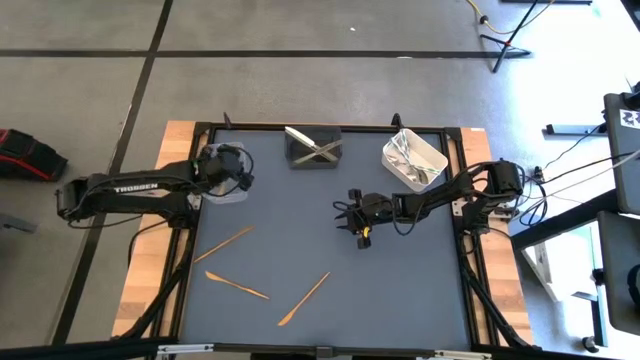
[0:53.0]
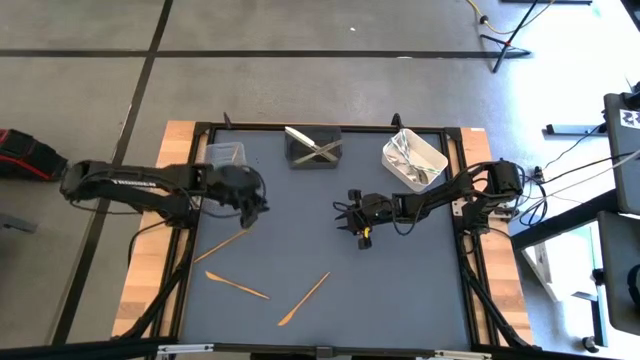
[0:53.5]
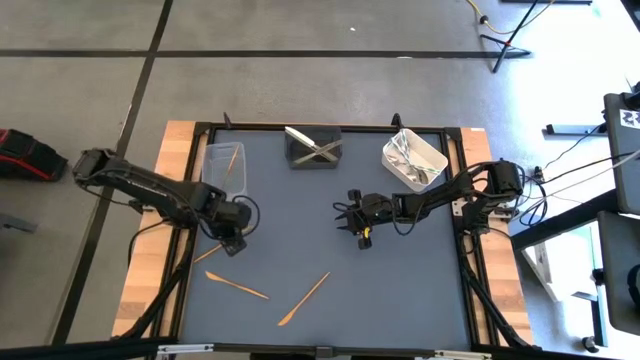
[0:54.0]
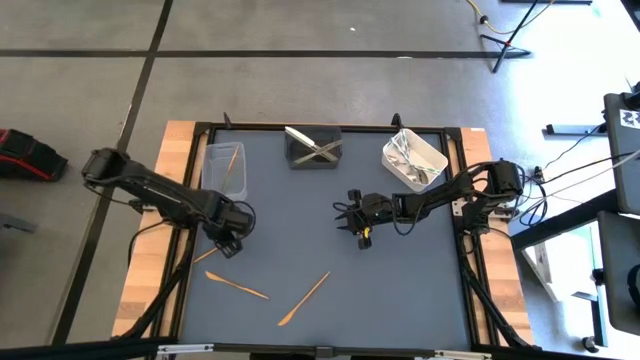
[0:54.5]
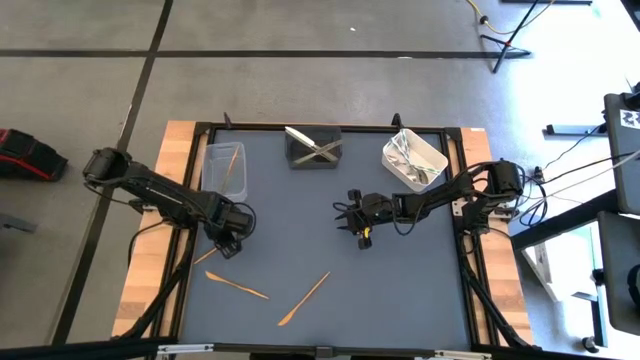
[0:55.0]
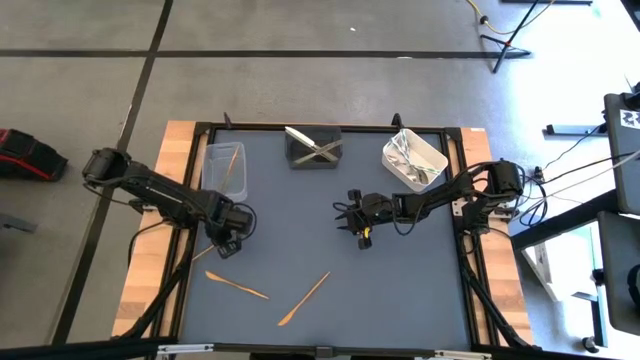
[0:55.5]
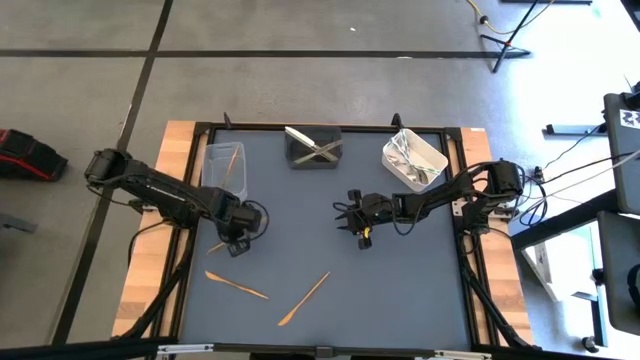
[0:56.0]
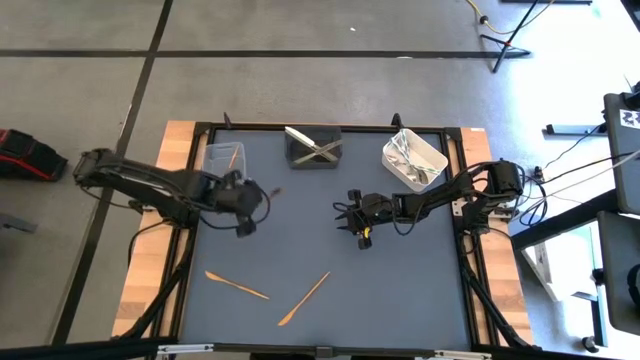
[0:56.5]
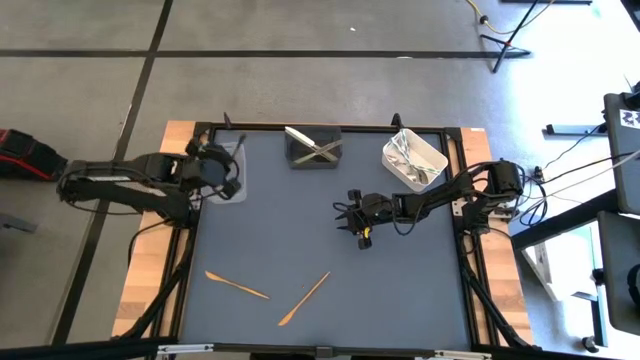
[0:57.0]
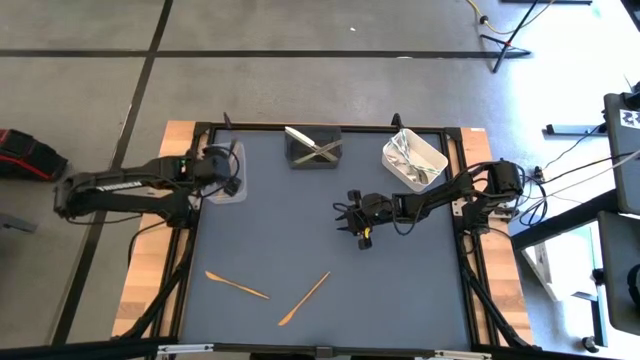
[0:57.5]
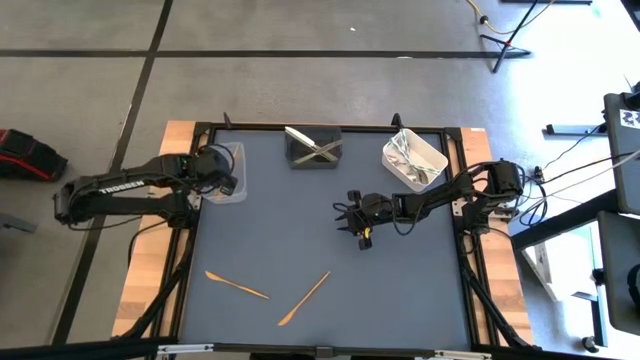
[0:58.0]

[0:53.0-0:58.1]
Task: Sort silverware by color (type)
Put the top left gold knife into the transparent bin

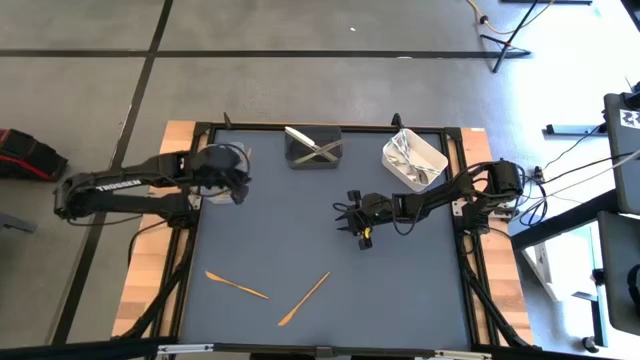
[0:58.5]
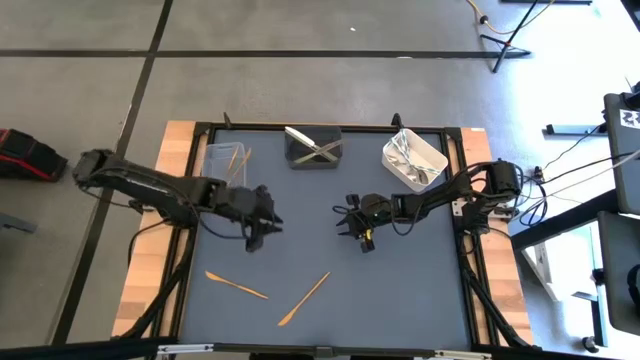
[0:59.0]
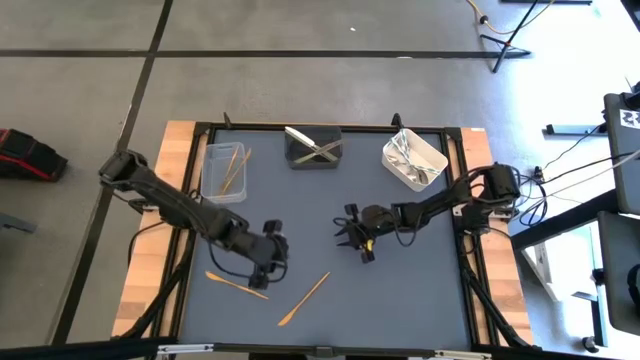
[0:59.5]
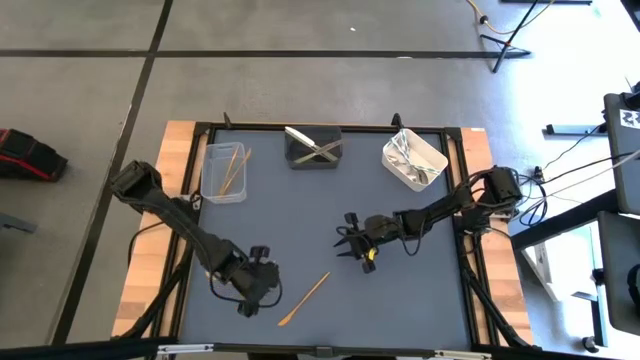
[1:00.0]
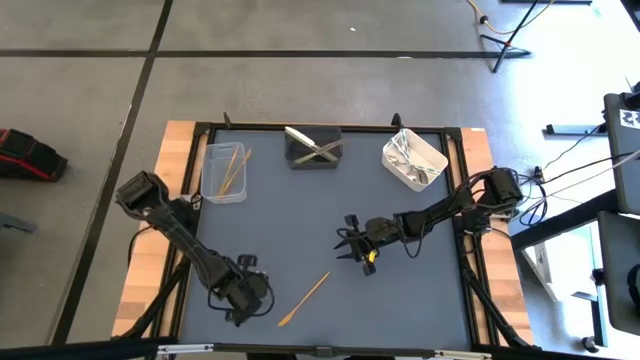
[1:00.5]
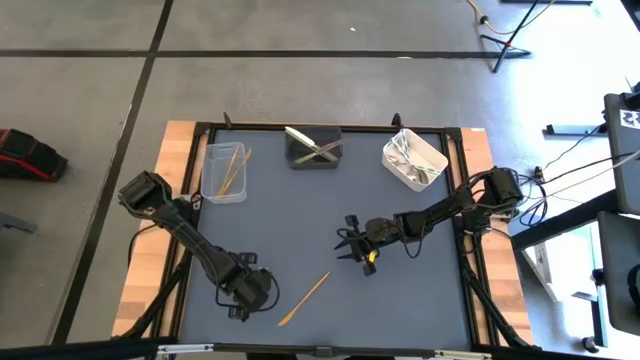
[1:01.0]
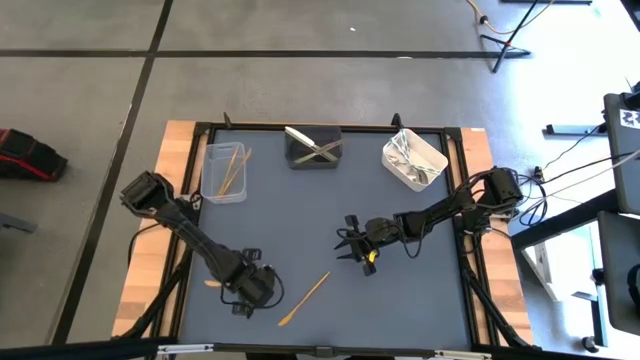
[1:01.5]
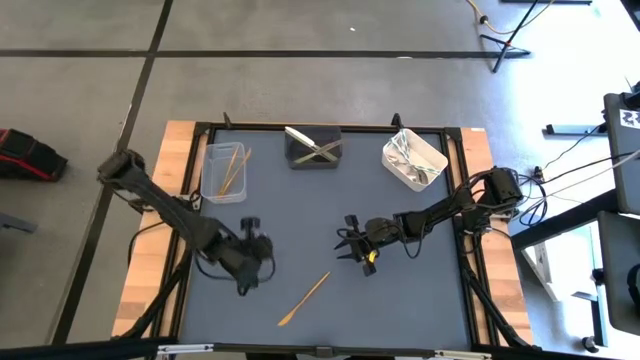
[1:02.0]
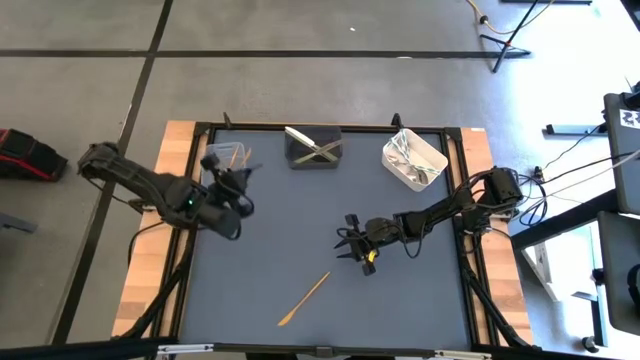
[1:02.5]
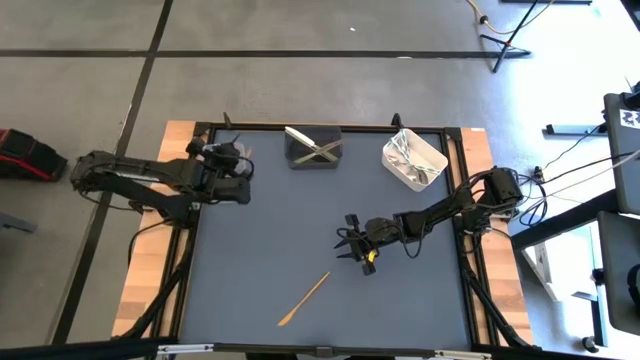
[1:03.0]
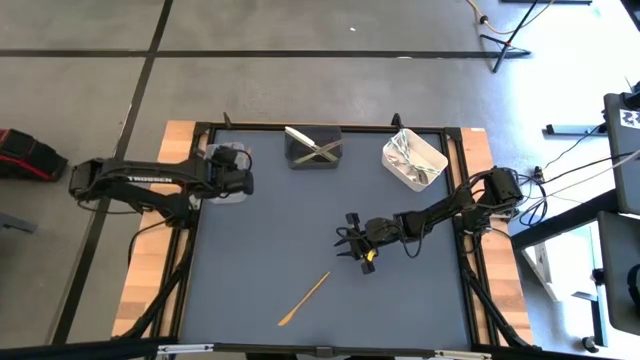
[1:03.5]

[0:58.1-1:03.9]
Put the left gold knife into the transparent bin

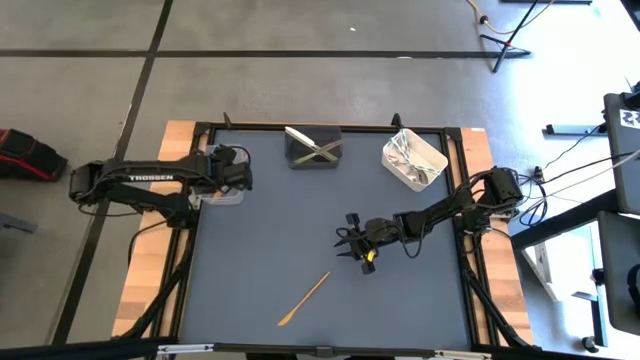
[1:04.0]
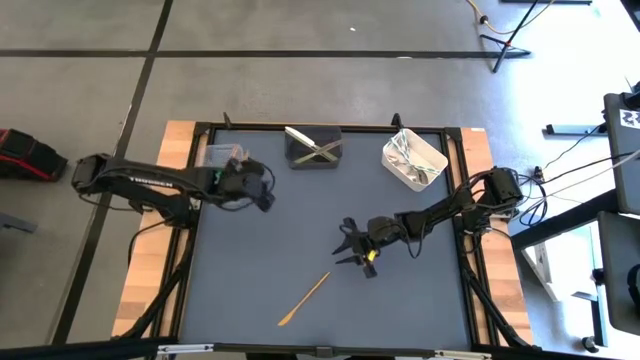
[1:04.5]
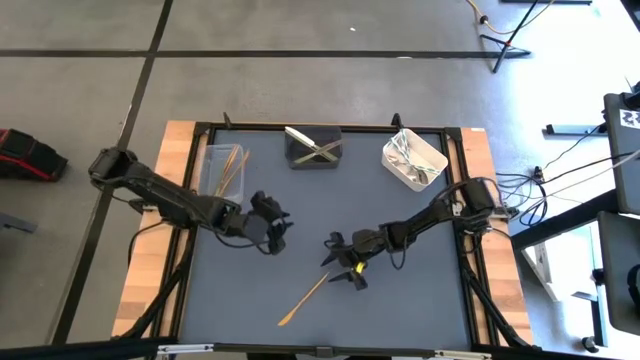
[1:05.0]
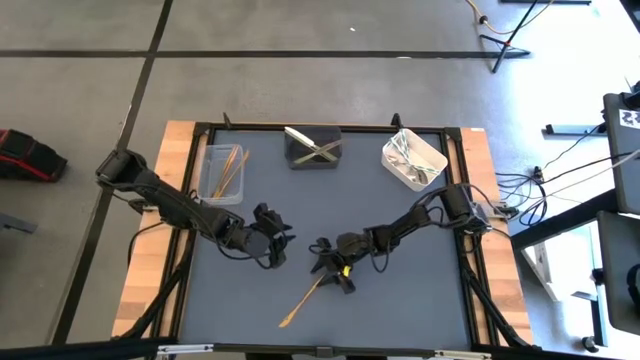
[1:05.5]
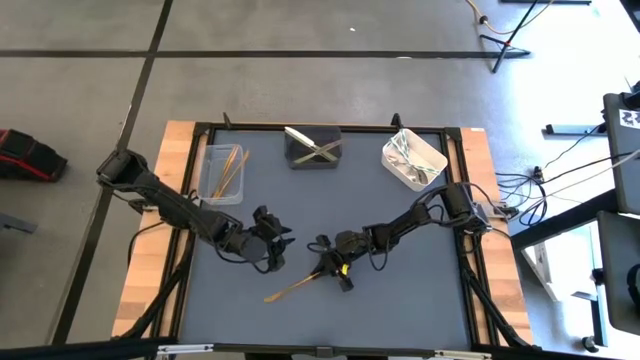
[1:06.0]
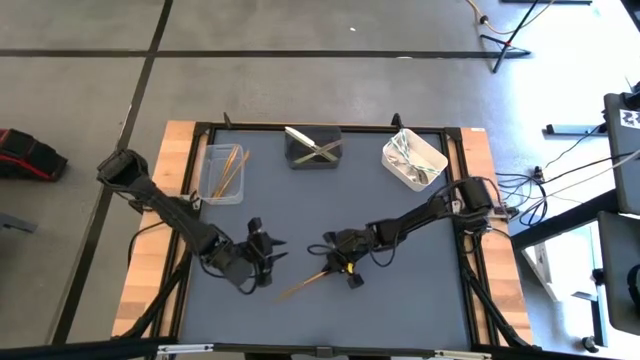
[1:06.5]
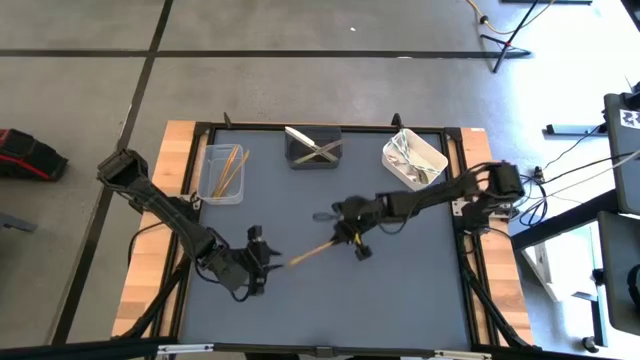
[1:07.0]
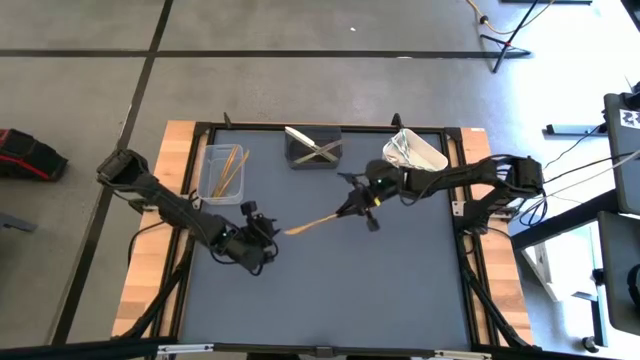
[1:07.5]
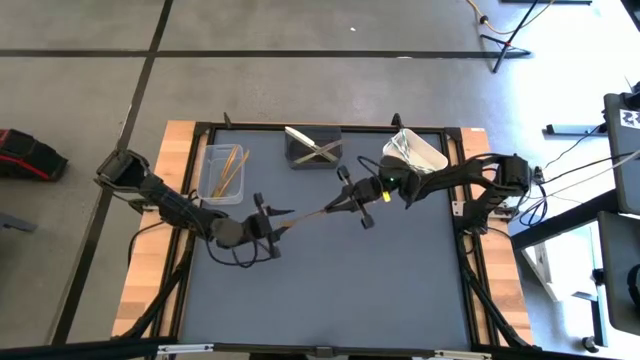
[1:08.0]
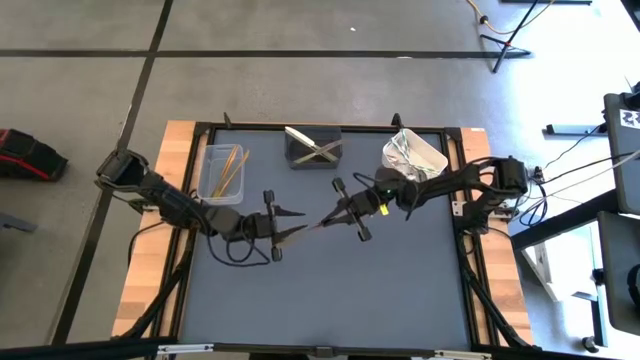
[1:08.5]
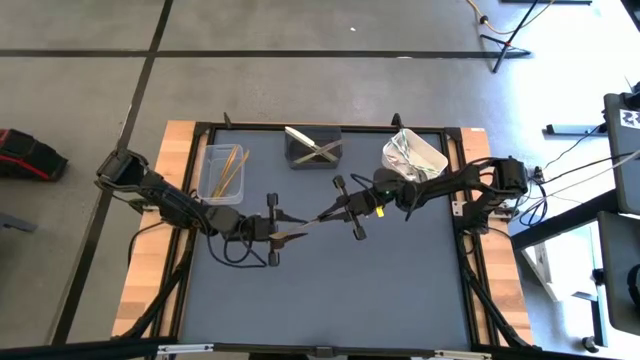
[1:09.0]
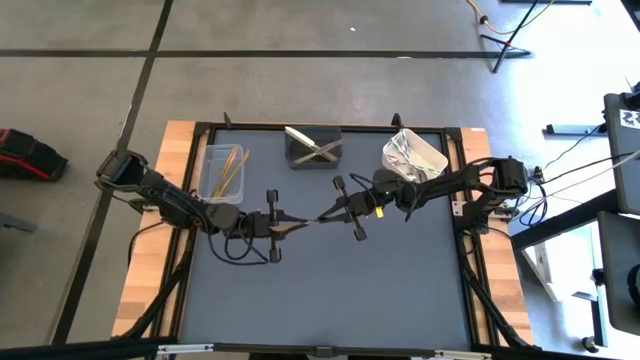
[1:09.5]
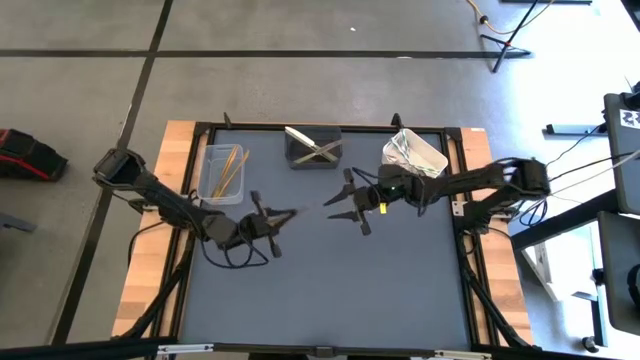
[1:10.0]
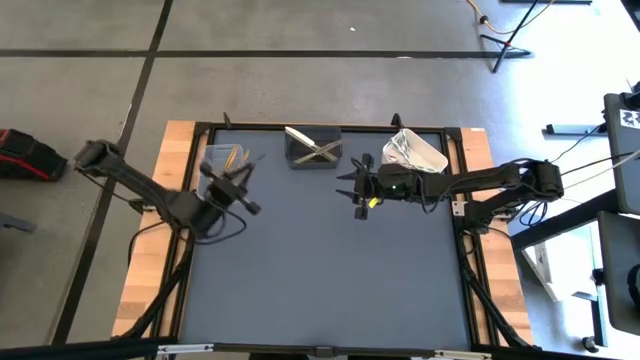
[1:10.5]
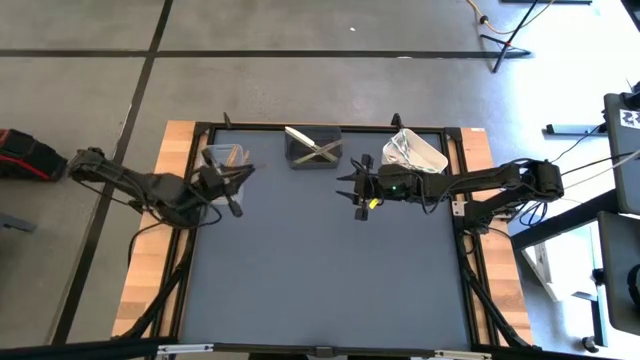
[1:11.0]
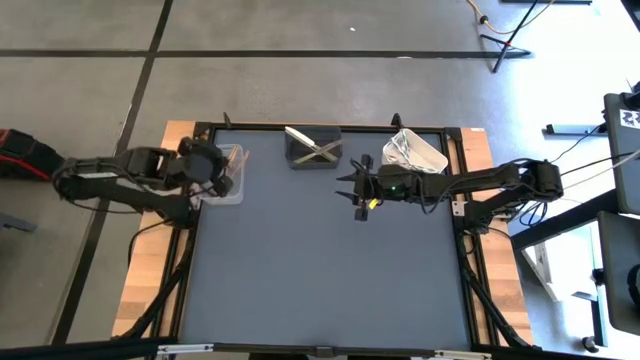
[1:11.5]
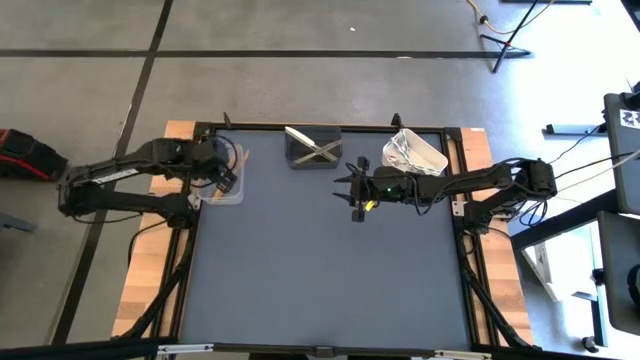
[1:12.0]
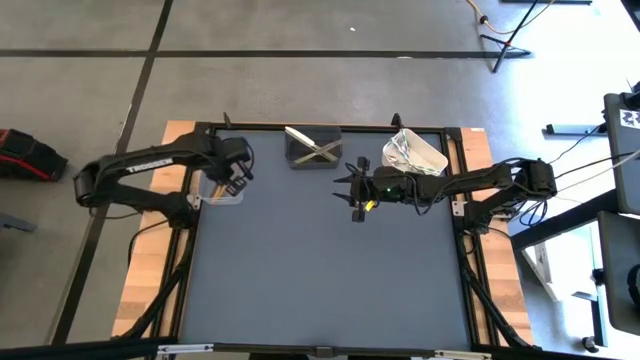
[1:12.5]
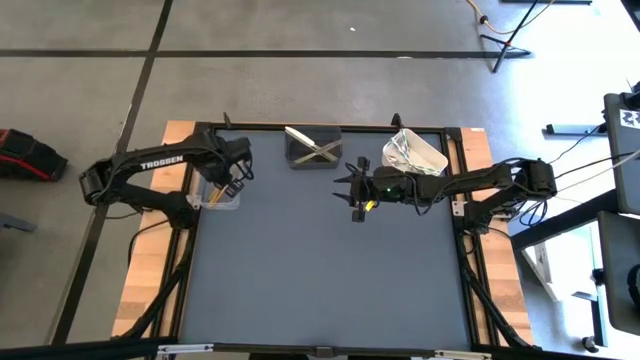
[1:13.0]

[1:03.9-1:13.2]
Put the gold knife into the transparent bin

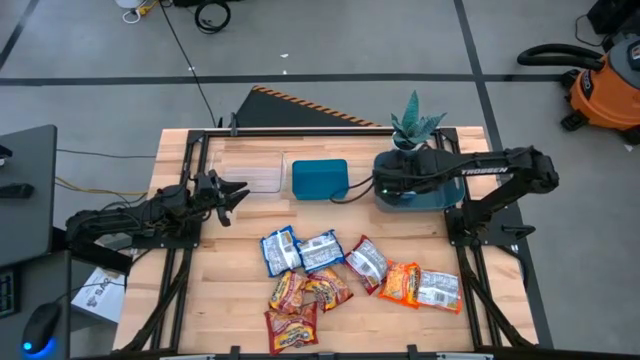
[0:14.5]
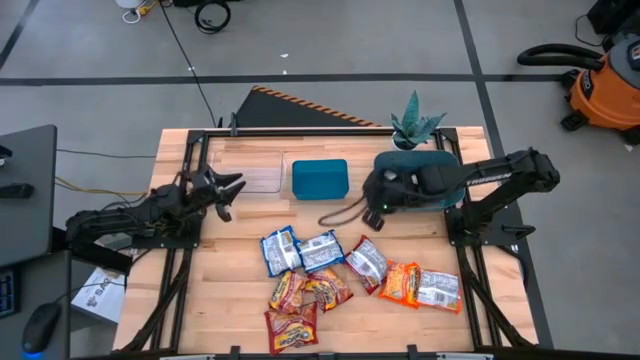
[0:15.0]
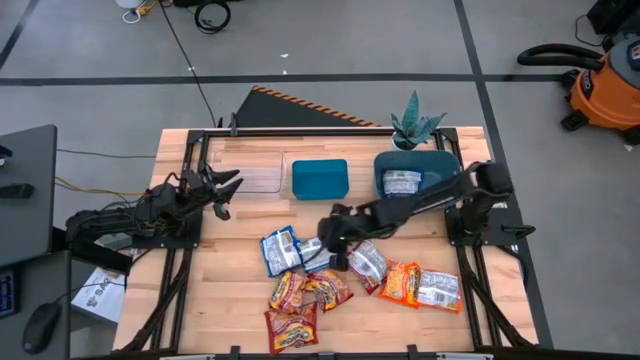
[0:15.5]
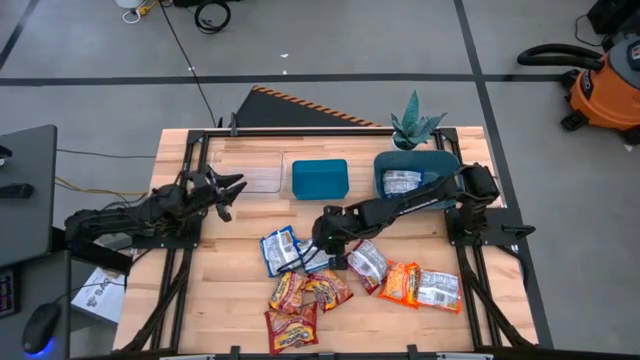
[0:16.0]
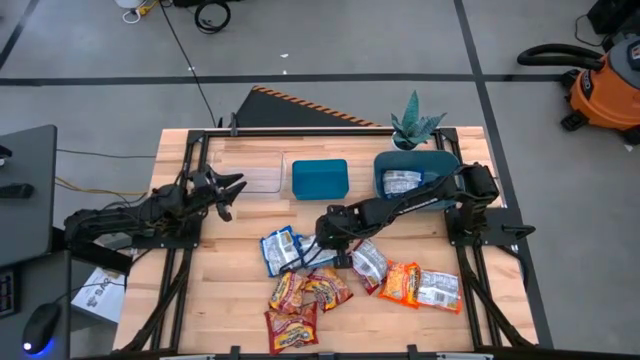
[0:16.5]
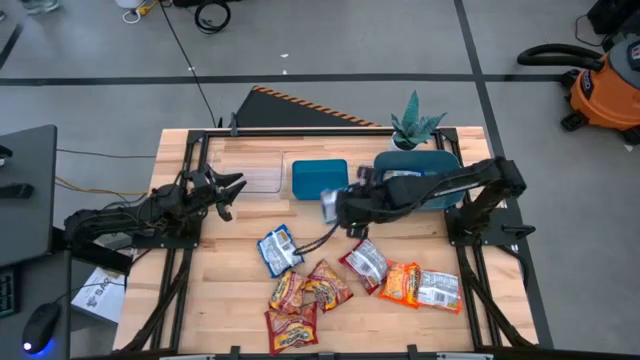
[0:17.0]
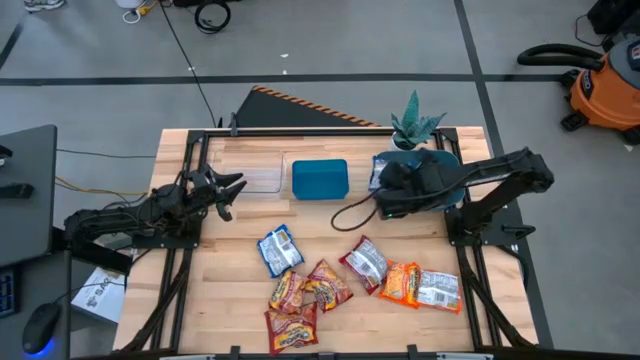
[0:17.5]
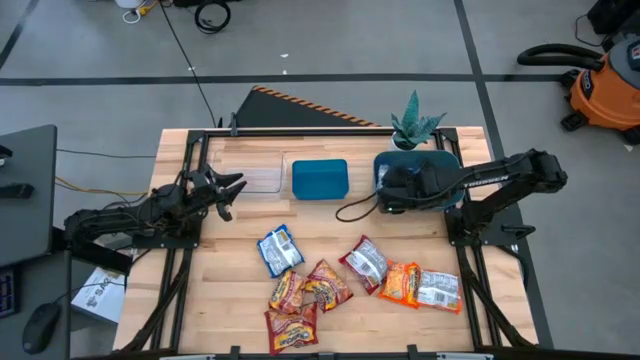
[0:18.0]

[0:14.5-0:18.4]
Task: Sort Maruchan noodles
Put the blue noodle pack into the green bin
